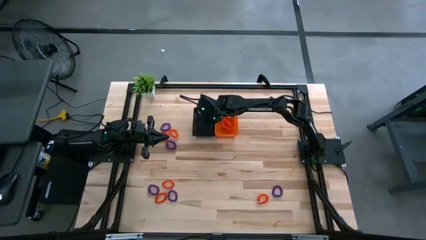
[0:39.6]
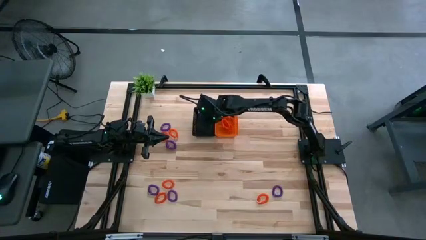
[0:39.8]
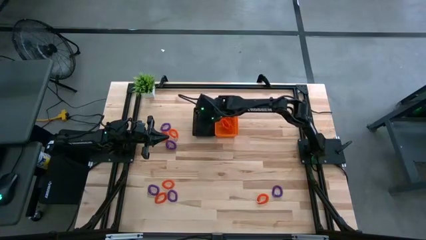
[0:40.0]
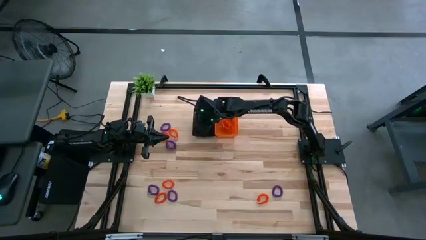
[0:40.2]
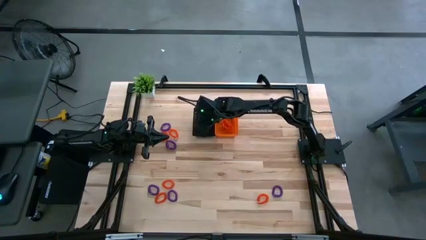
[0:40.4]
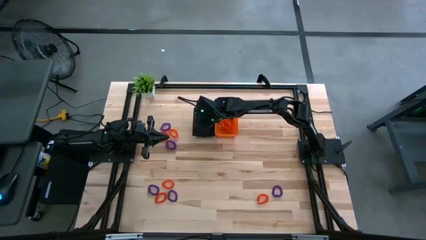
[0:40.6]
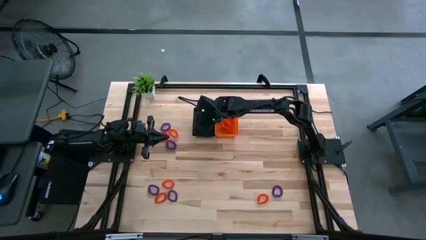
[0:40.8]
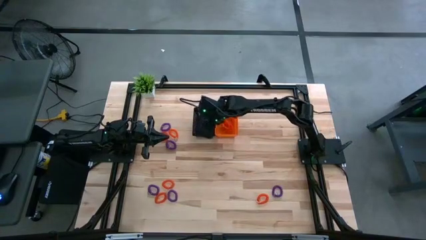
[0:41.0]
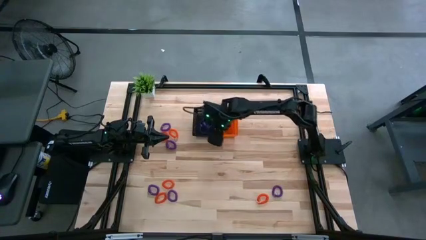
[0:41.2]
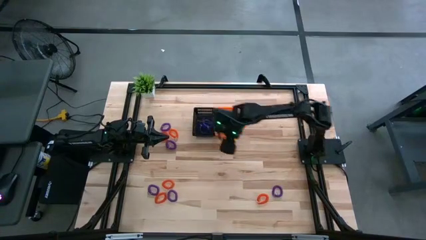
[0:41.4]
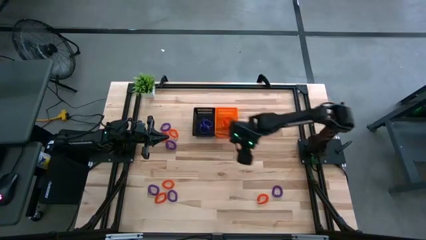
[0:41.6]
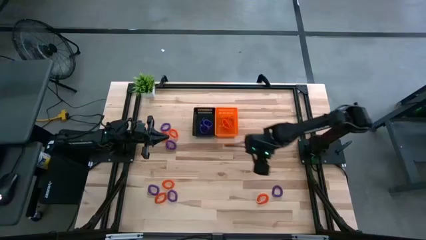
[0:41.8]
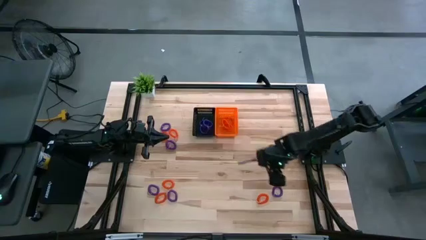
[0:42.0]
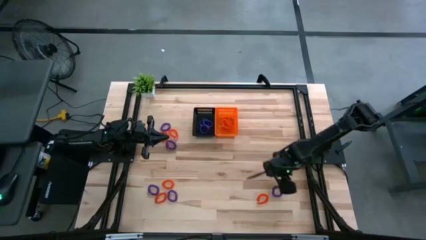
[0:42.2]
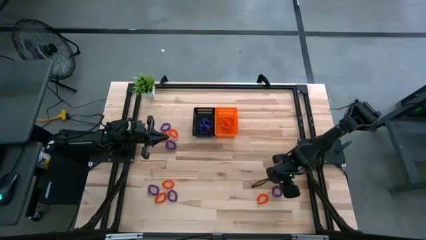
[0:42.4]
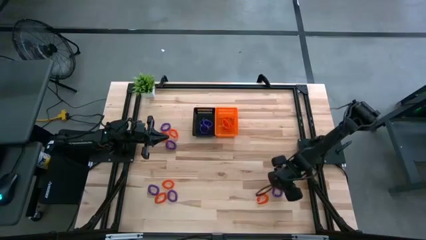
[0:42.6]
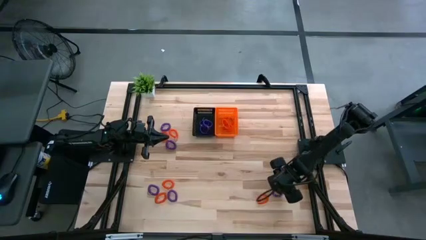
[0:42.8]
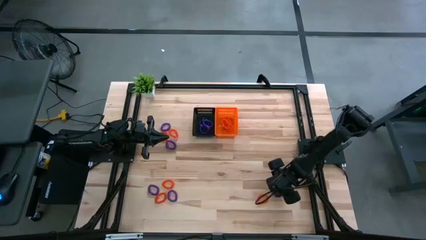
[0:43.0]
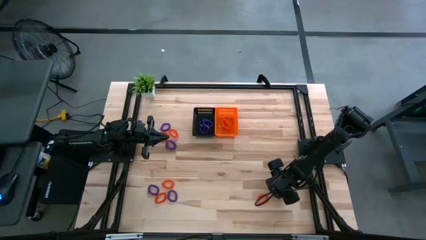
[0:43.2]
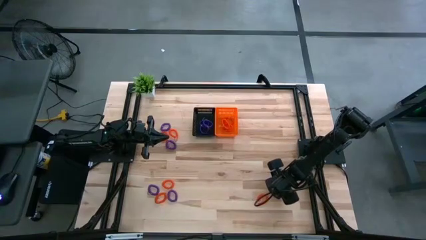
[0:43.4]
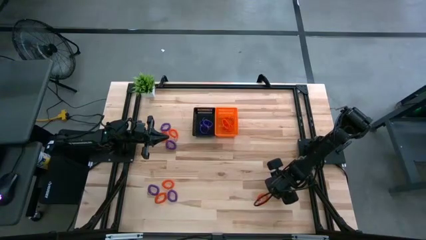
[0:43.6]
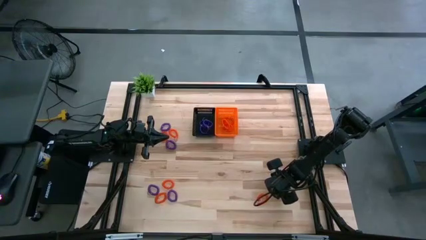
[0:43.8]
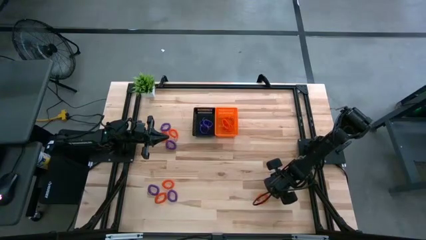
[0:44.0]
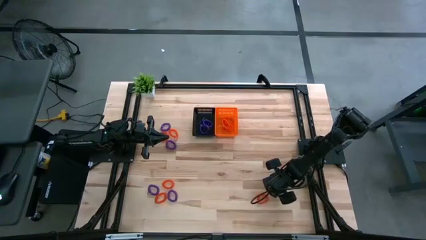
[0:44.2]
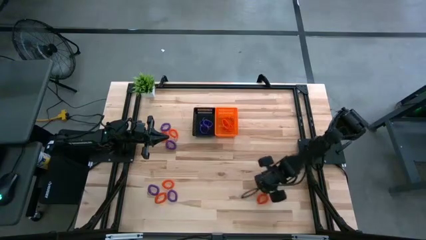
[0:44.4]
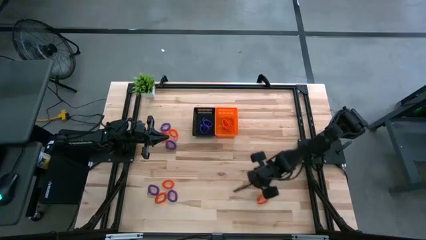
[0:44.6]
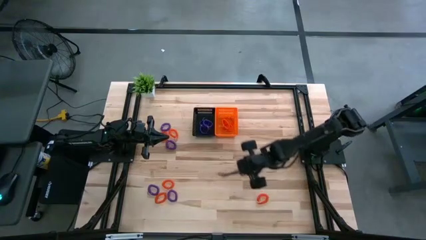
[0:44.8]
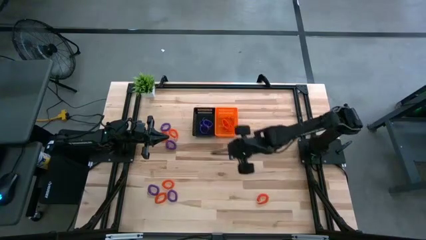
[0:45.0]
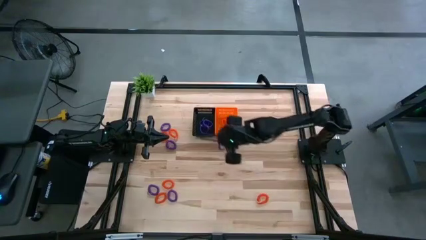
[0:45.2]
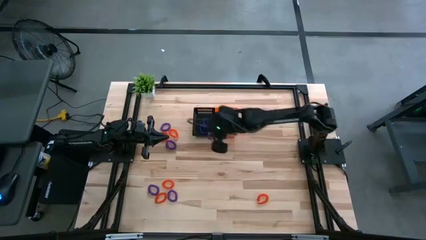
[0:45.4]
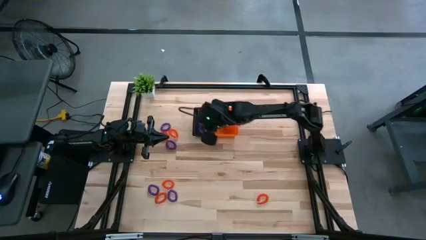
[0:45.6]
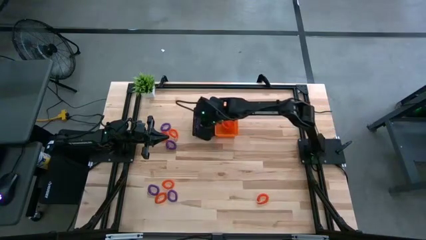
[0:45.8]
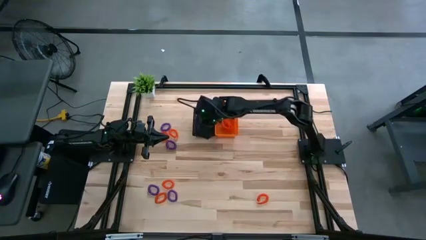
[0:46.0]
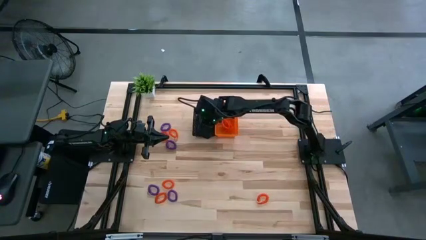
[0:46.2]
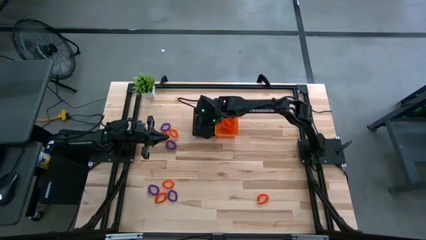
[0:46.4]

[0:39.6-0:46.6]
Task: Sort spring keychains into baskets
Put the purple spring keychain into the black basket

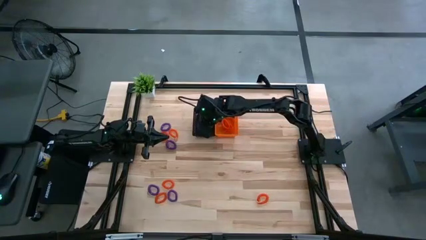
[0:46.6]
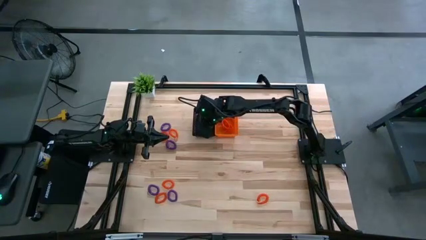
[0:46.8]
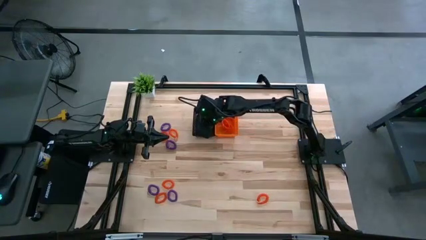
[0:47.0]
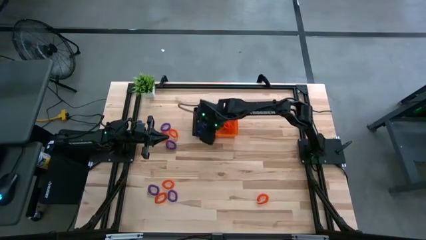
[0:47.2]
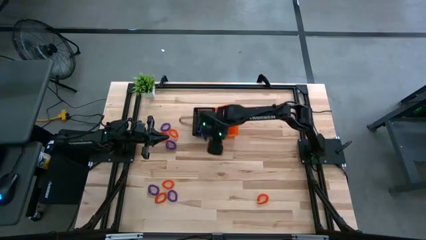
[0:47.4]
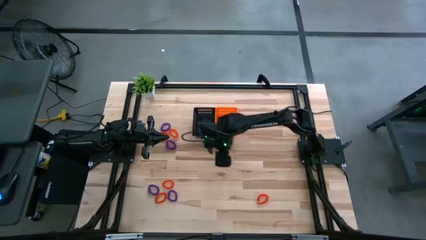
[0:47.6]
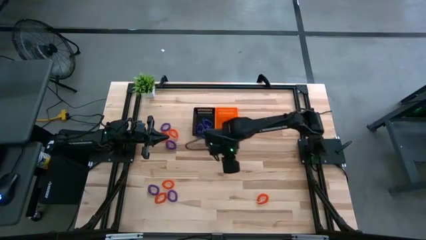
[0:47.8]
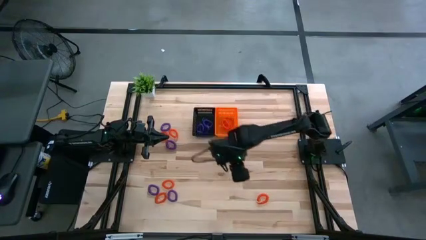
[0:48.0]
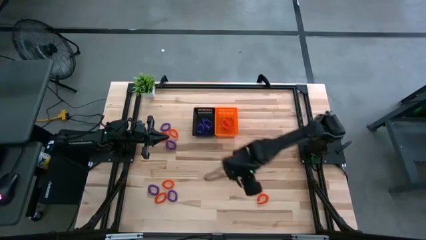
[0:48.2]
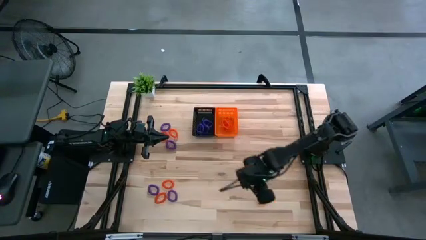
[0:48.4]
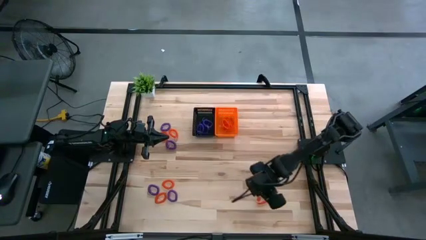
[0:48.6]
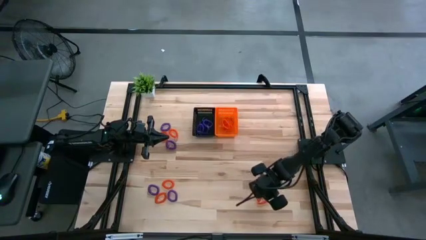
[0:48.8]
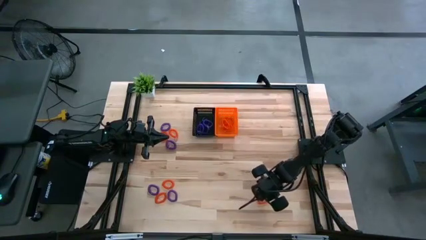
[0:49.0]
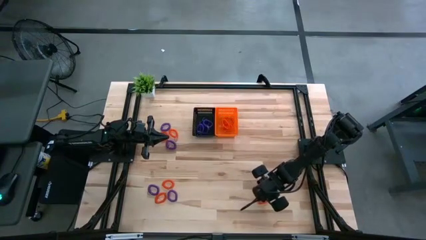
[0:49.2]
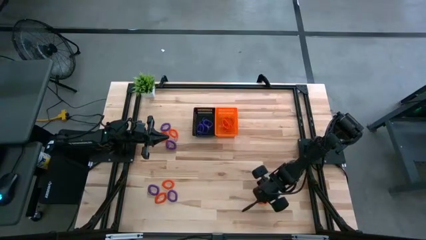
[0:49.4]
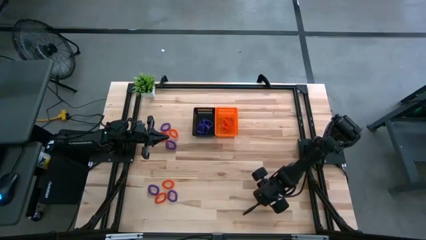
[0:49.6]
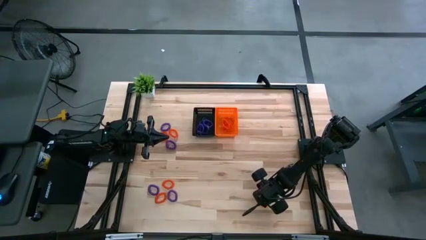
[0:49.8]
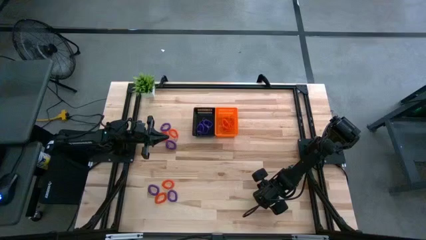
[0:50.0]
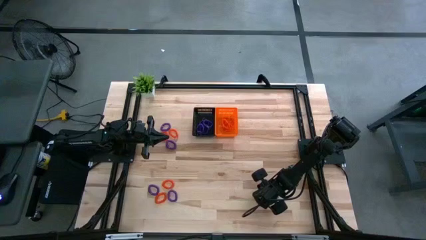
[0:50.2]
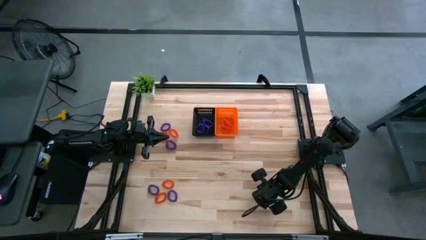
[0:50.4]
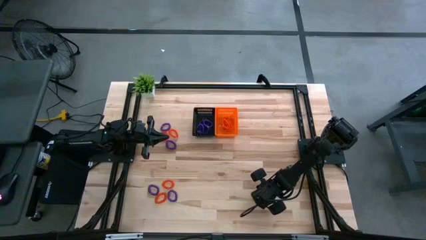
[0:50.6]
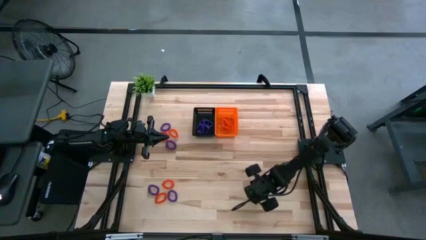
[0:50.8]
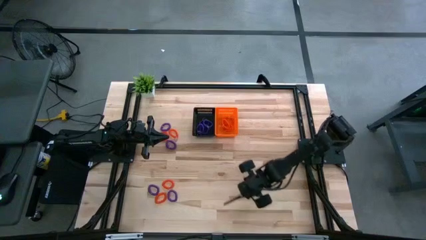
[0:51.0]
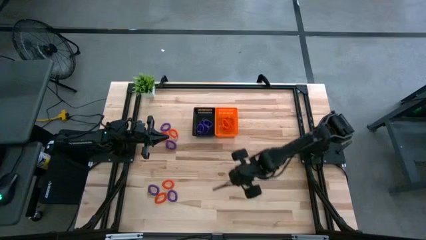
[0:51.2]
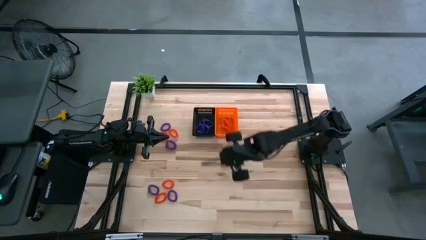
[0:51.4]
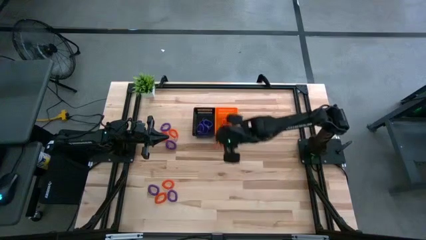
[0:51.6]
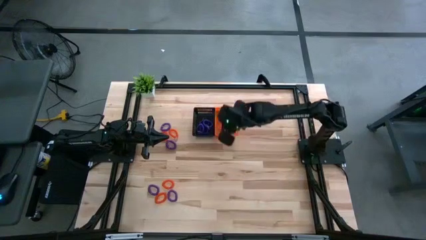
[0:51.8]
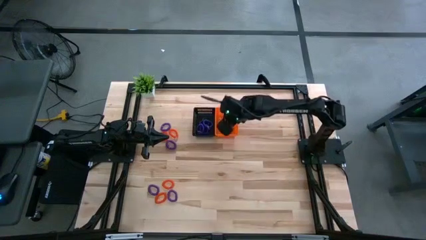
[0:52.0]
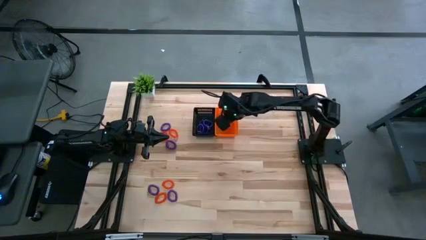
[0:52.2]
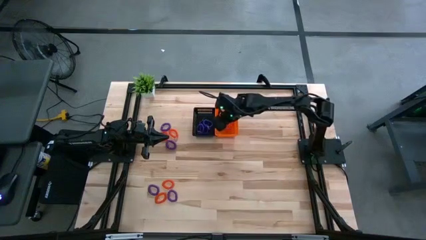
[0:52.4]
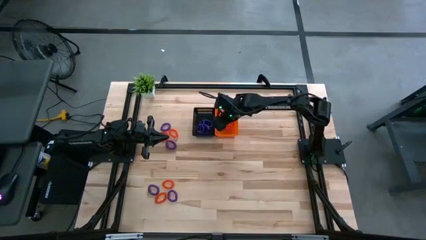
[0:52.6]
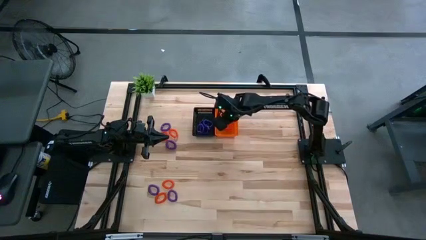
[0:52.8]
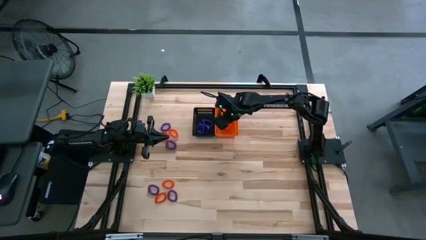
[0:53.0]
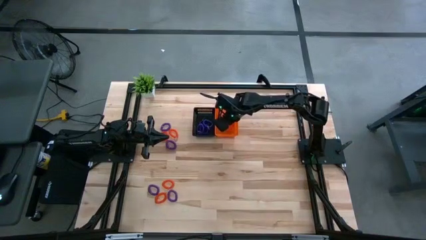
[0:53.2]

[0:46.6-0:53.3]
Put the orange spring keychain into the orange basket

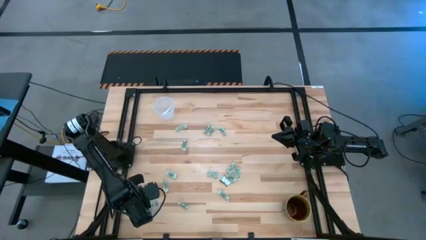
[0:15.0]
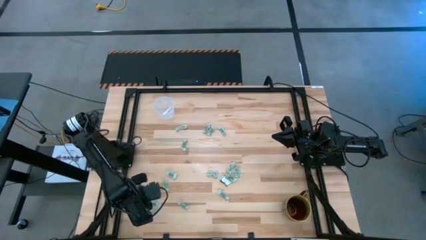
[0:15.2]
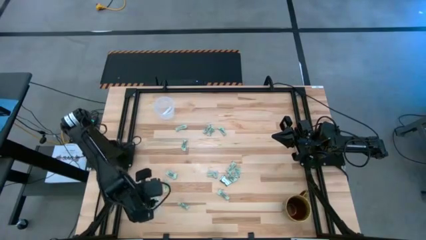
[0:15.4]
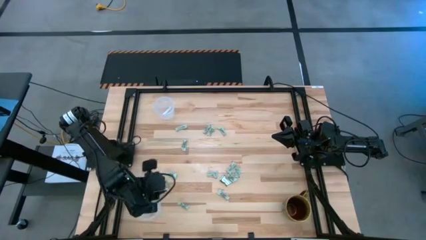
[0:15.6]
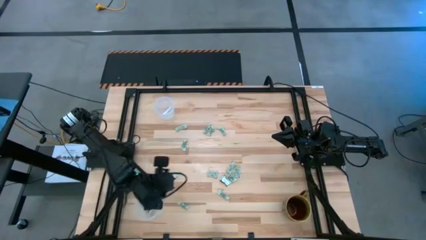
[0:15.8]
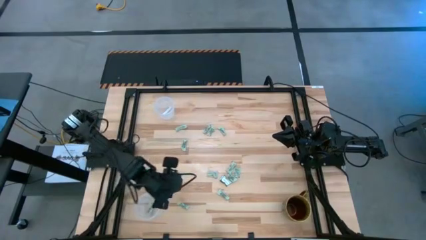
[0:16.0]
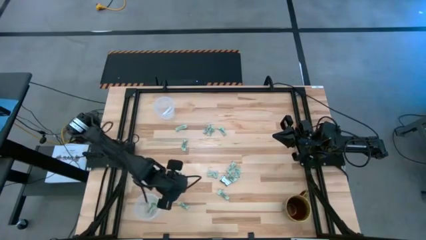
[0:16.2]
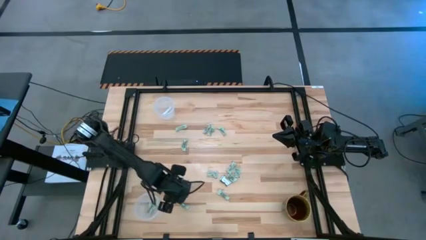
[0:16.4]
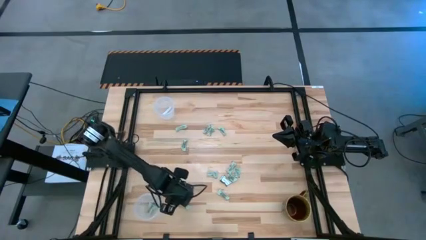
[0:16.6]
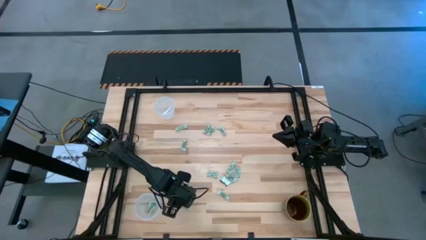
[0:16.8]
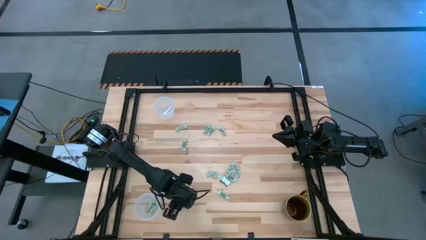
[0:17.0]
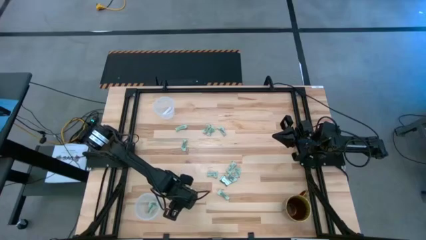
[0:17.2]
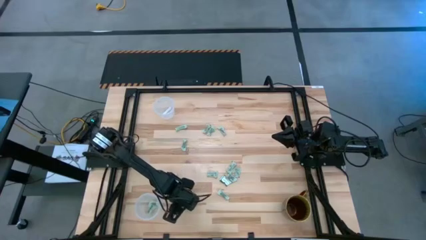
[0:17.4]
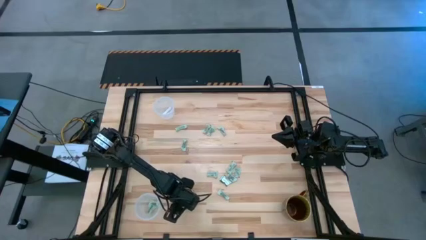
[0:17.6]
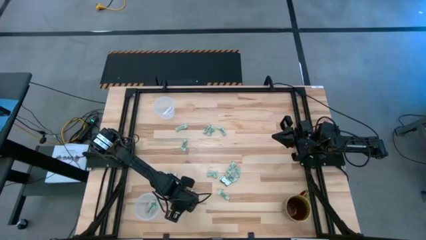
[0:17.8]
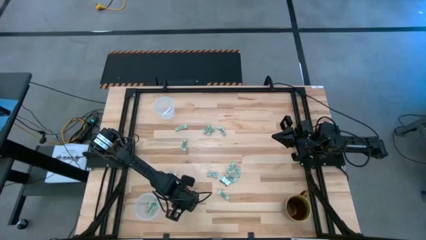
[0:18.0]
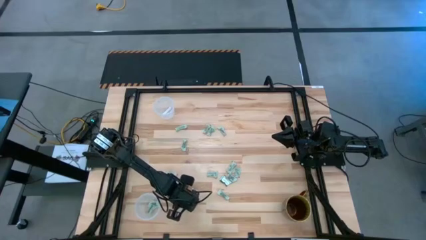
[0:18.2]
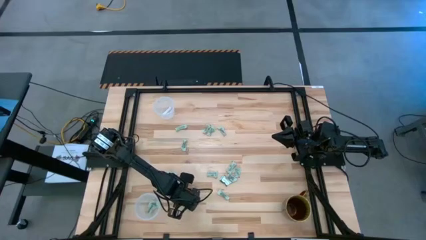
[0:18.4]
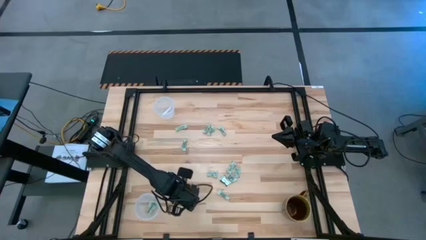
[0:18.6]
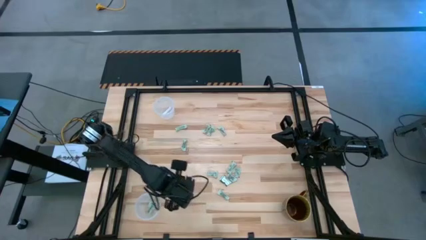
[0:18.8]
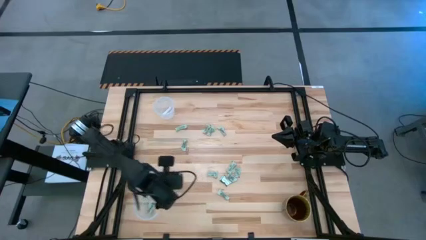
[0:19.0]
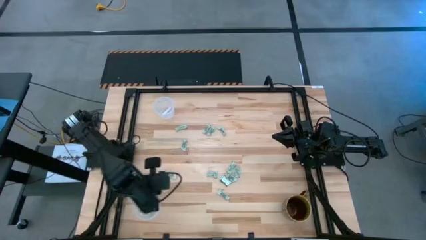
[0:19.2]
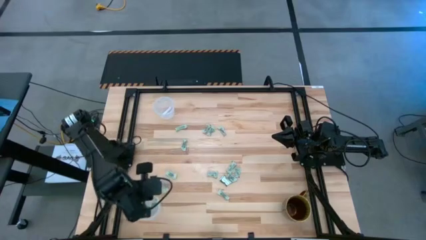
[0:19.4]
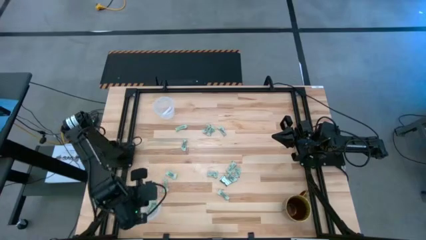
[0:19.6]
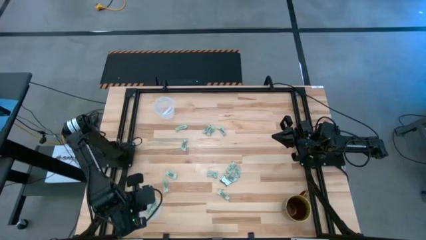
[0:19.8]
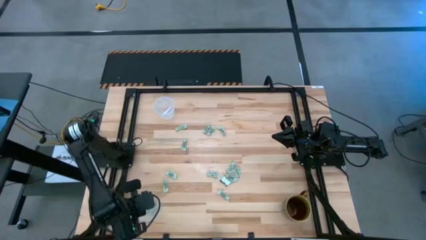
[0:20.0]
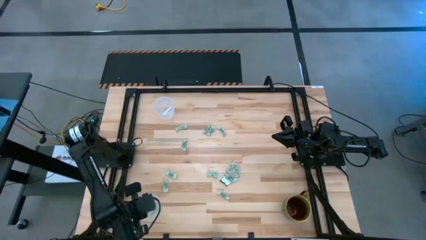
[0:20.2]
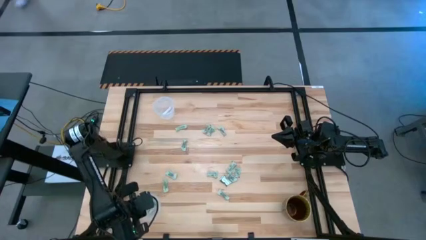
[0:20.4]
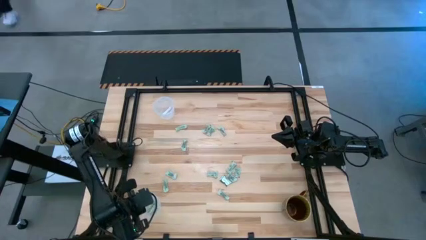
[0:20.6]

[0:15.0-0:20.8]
Task: Pick and place Stevia / Truvia into bins
Put the stevia packet into the bottom transparent container
